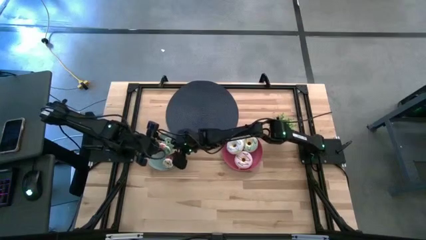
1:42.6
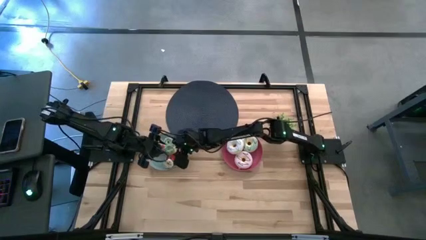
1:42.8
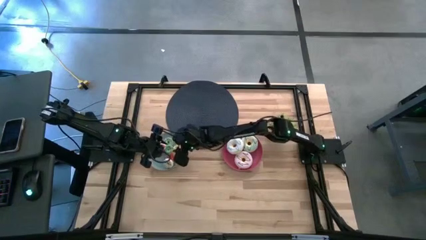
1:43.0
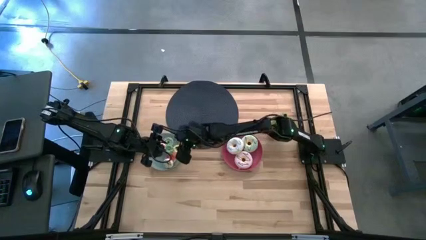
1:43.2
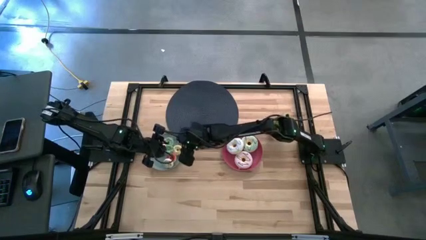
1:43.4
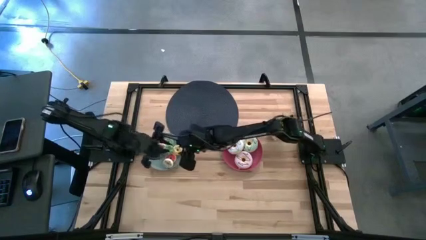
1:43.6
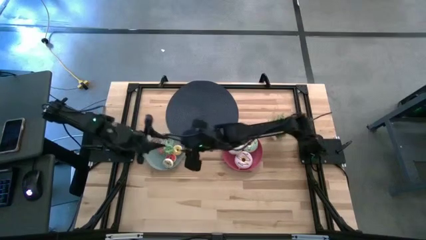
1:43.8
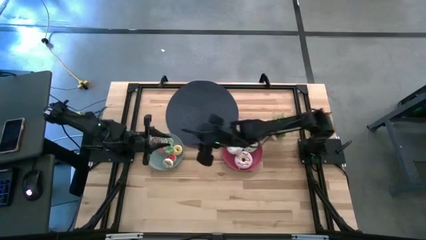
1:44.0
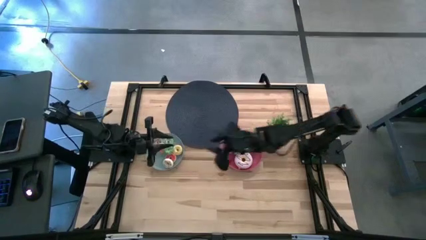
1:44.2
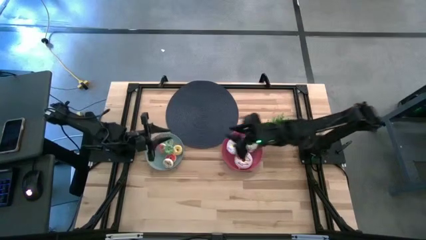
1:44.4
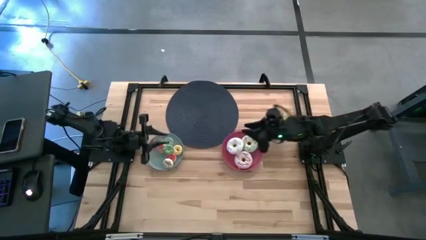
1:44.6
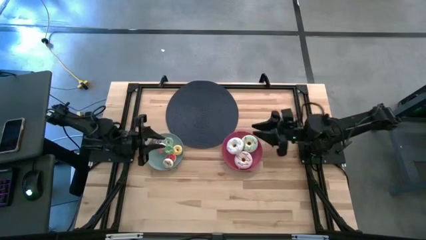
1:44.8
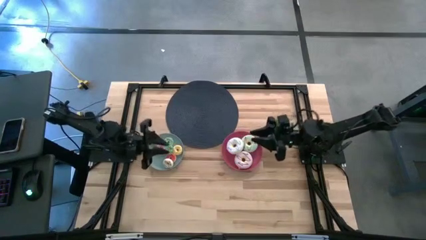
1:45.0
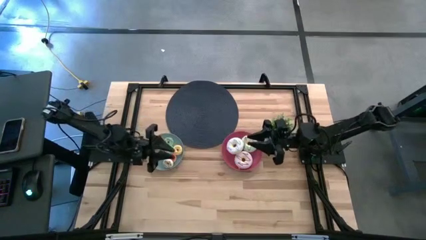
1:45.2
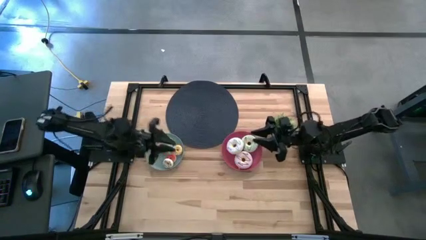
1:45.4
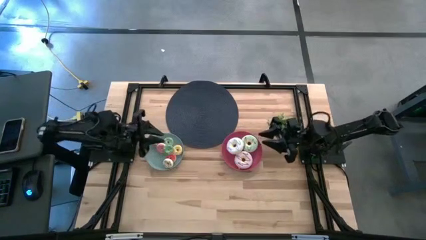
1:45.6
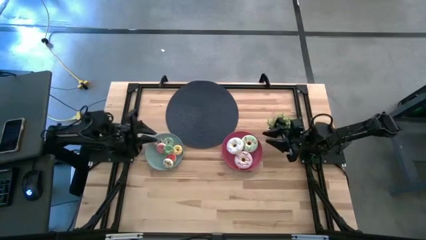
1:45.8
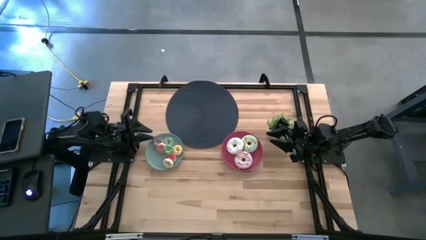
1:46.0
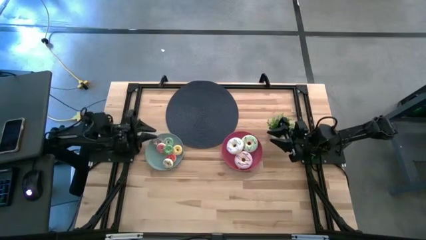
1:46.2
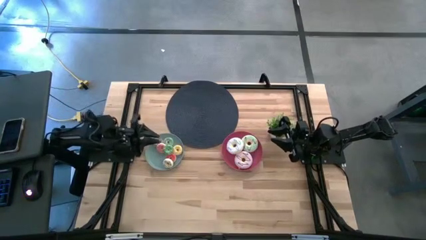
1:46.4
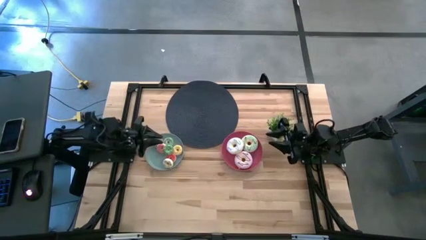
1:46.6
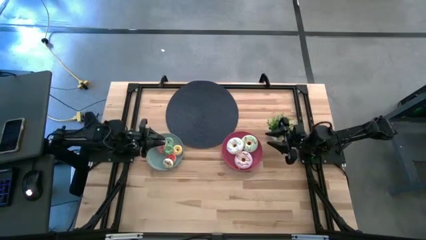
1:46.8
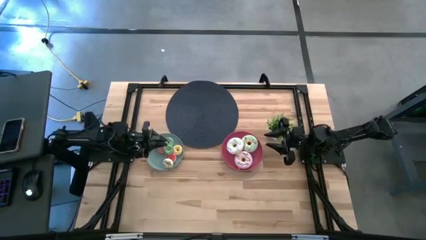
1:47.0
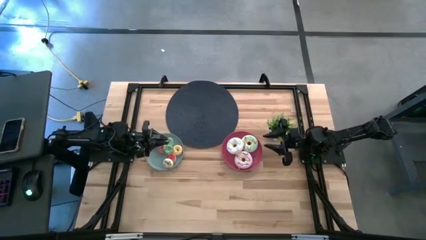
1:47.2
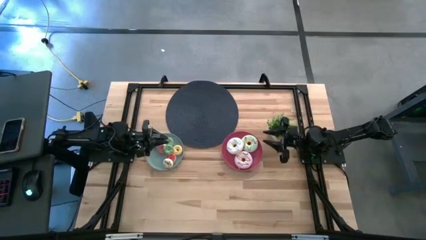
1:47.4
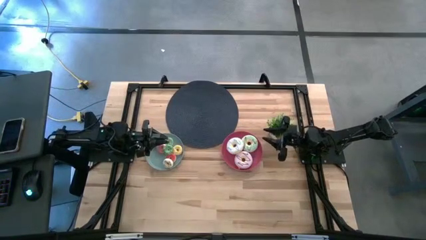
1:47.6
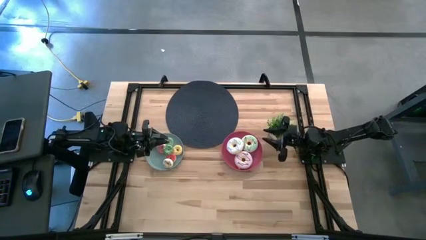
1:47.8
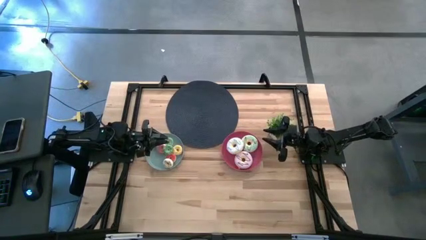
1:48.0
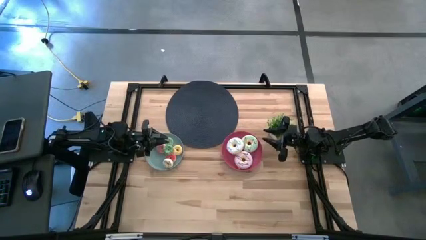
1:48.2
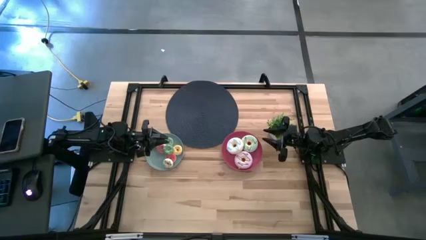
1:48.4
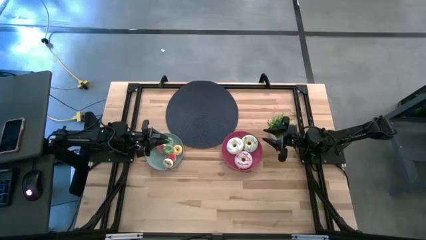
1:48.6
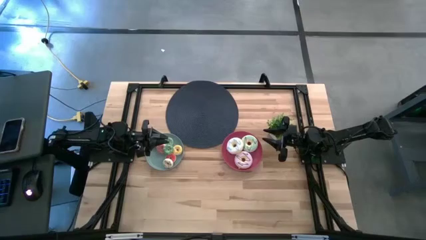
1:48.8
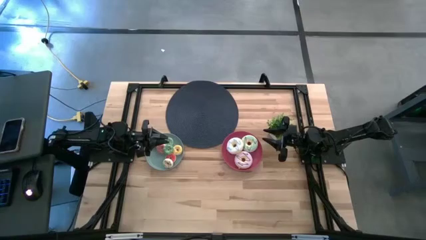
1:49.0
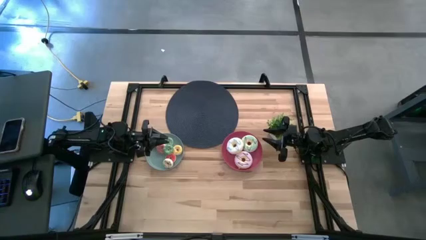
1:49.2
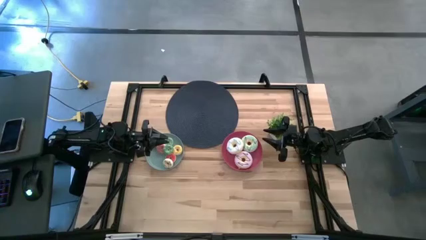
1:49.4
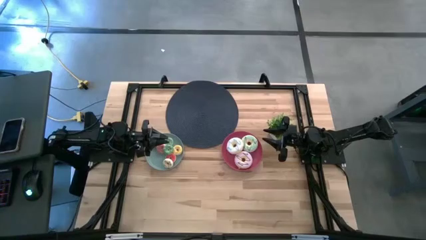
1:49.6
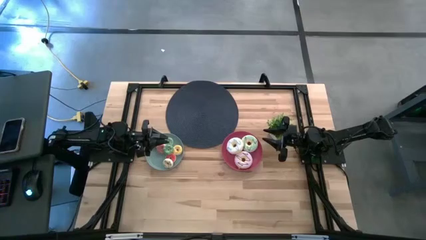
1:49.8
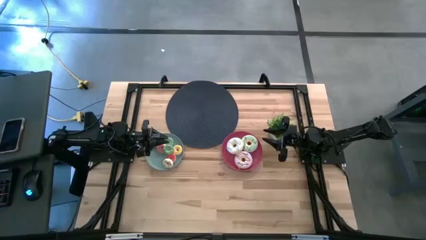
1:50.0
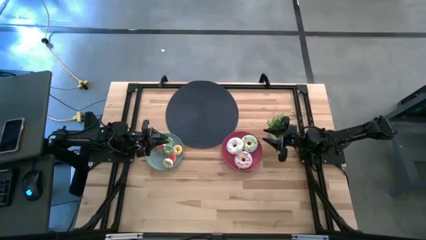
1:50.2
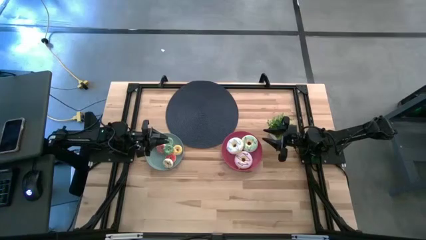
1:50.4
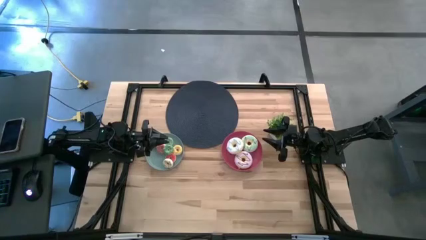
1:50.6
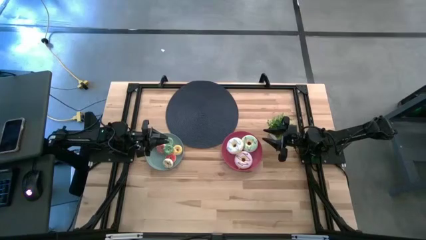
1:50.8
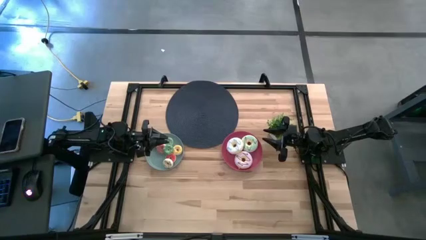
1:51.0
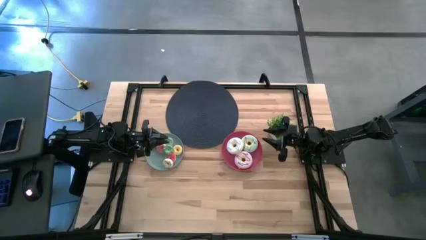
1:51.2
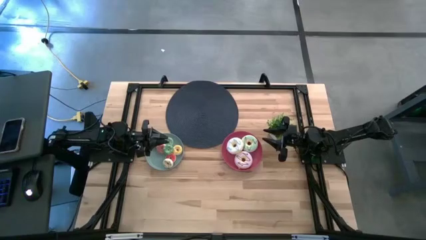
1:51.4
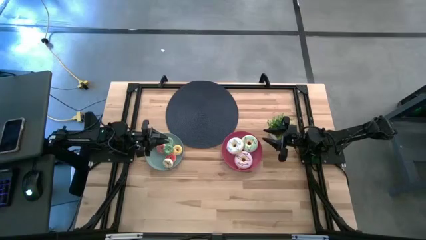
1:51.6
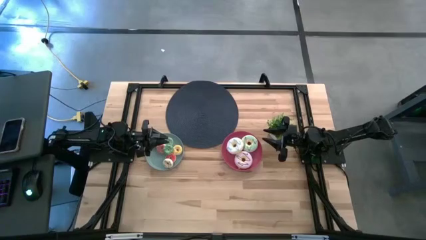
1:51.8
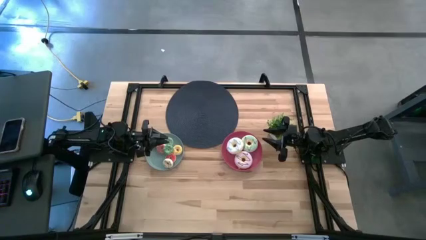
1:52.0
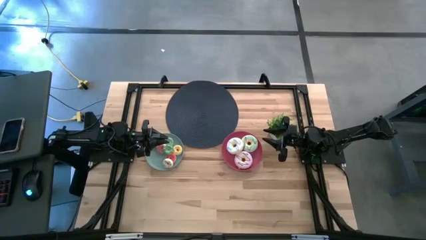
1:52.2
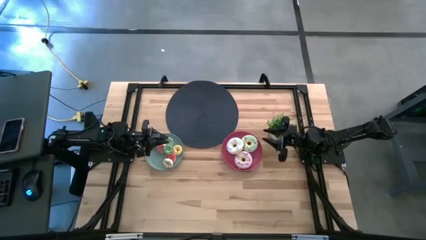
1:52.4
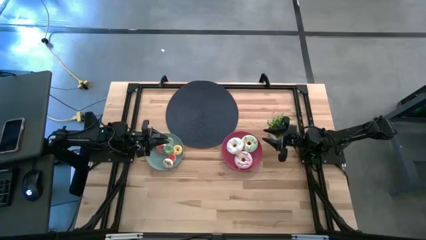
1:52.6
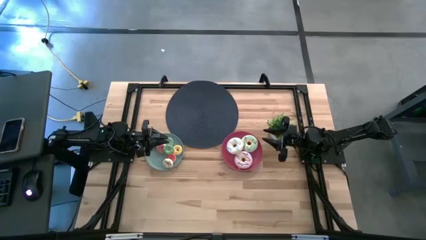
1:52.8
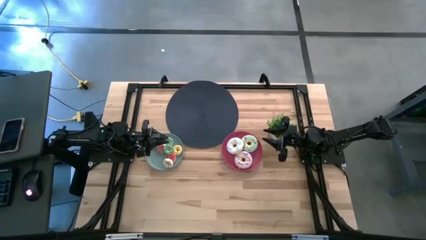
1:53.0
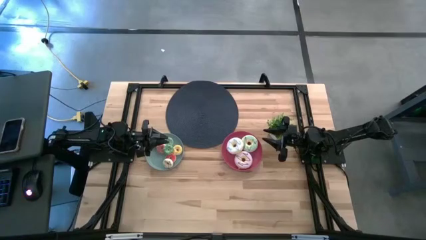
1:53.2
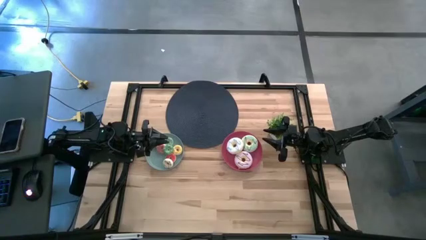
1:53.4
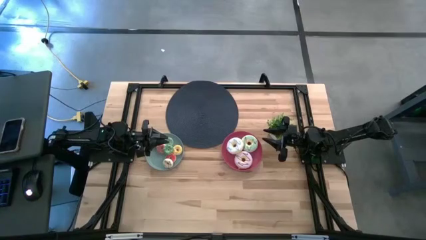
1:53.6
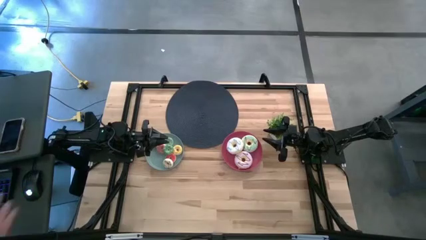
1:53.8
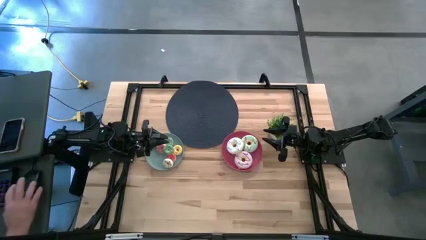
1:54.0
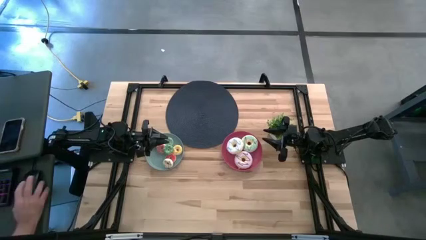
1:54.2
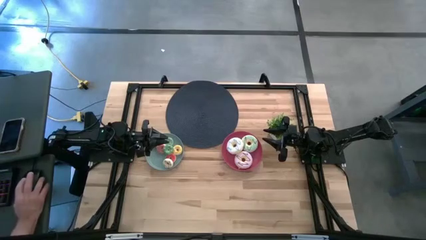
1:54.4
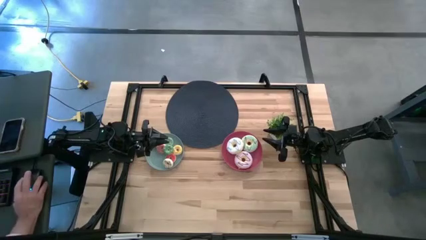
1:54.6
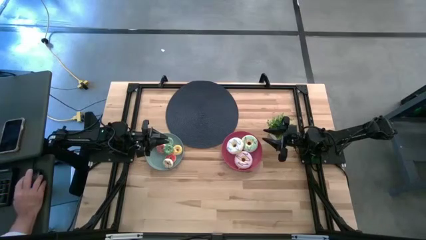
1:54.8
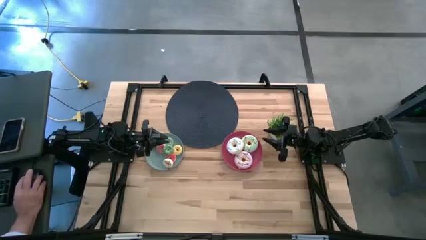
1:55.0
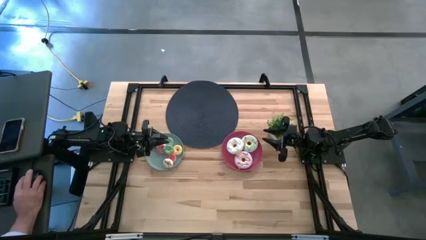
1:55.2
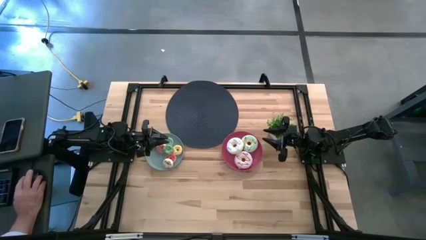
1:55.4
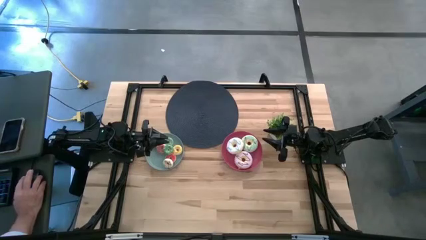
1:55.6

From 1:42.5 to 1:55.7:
Task: Pick & Place donuts
Return to Home Position

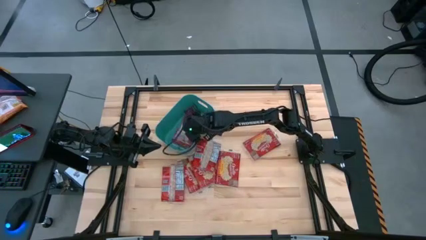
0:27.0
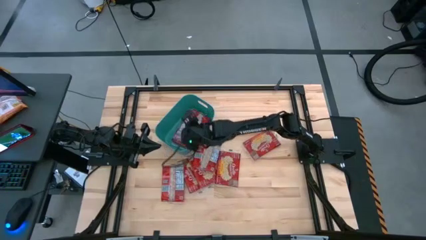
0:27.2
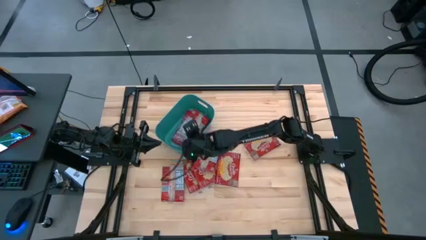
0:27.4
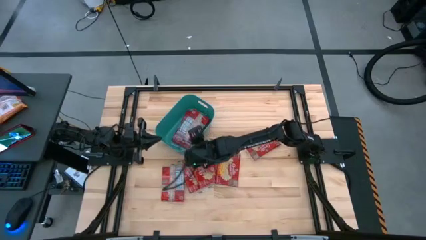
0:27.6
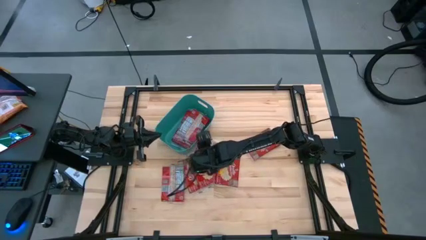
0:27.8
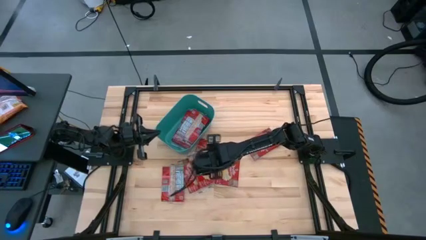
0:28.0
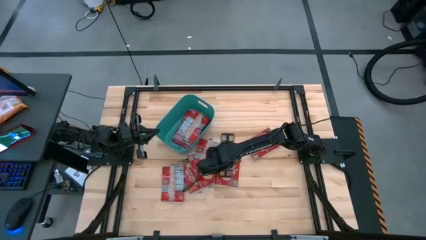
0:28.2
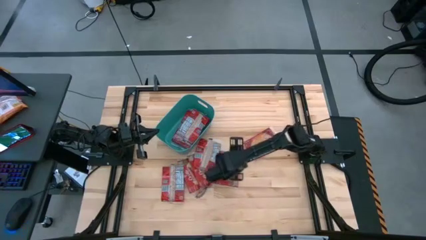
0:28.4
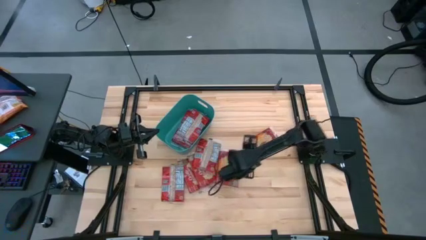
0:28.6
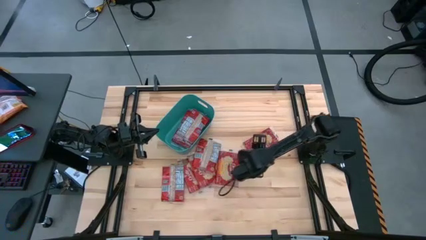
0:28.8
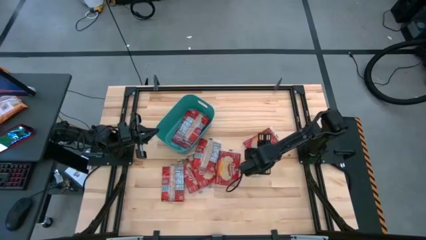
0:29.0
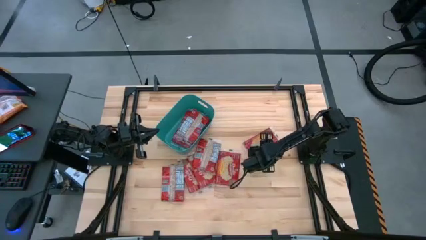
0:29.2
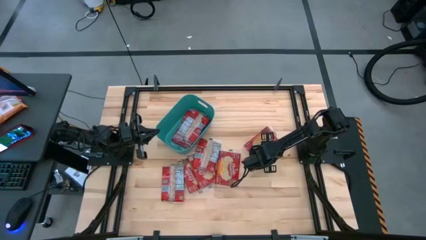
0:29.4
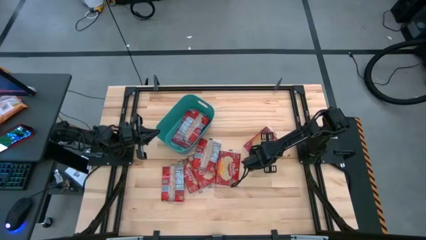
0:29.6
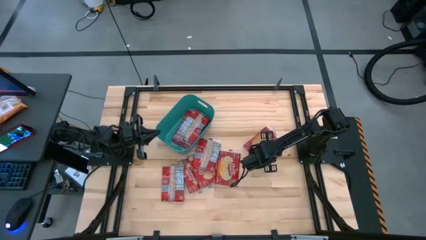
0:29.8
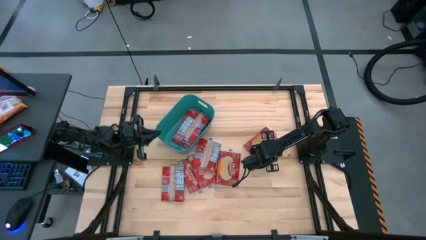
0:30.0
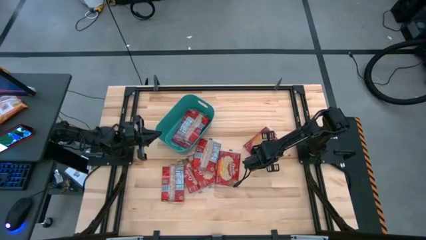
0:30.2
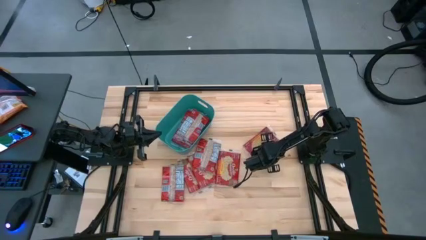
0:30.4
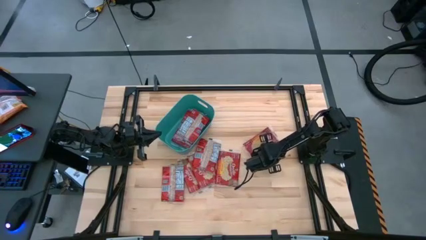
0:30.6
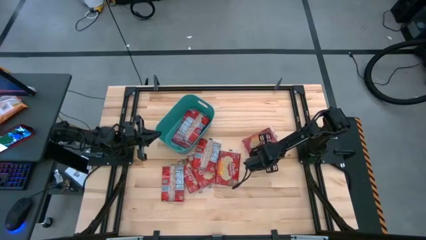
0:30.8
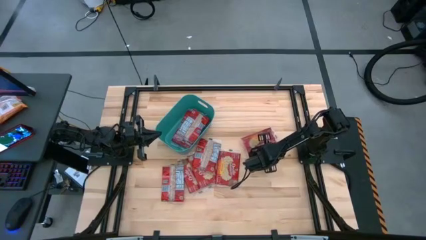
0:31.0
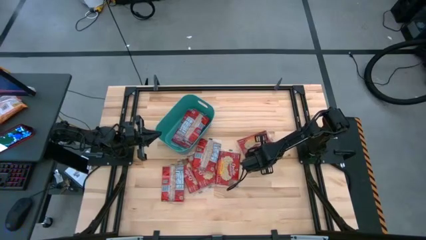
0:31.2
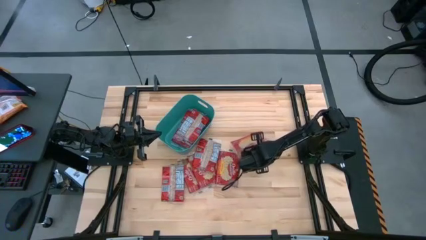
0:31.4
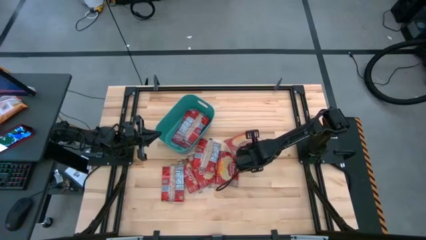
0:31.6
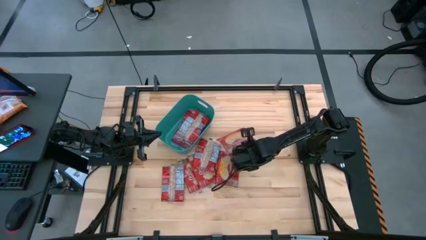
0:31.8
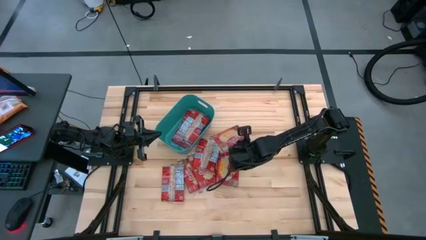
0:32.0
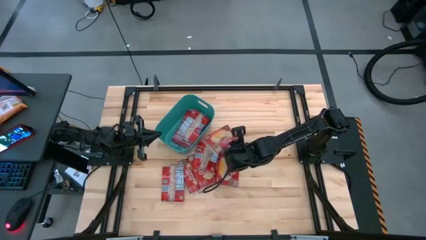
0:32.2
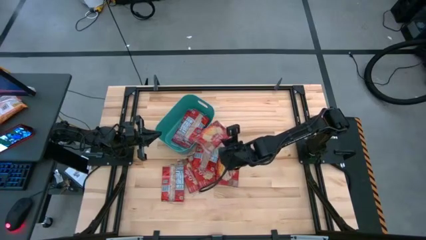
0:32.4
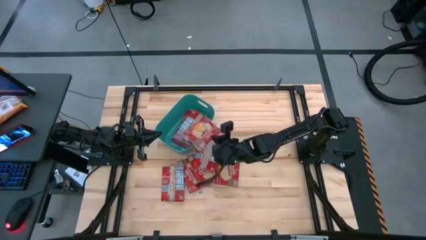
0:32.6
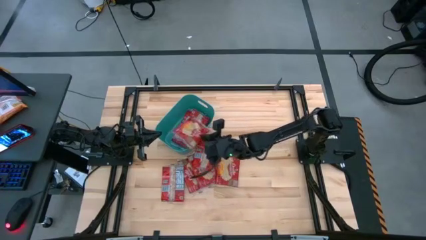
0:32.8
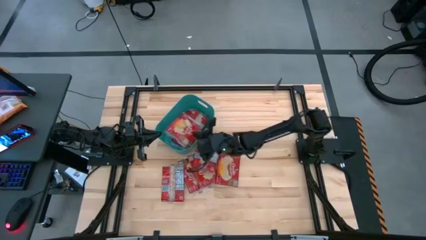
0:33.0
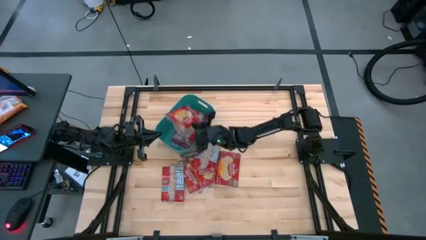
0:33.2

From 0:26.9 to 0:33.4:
Task: Sort popcorn bags into baskets
Put the red popcorn bag into the blue bin
